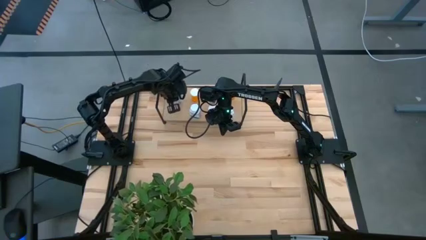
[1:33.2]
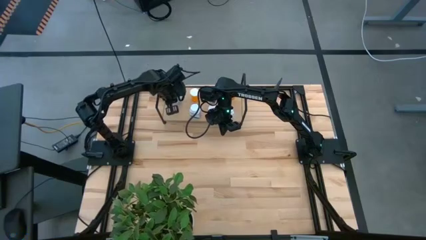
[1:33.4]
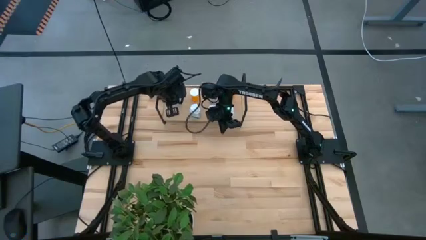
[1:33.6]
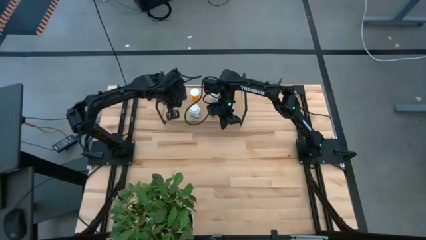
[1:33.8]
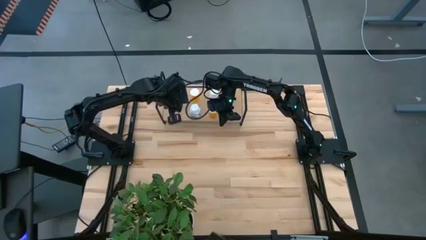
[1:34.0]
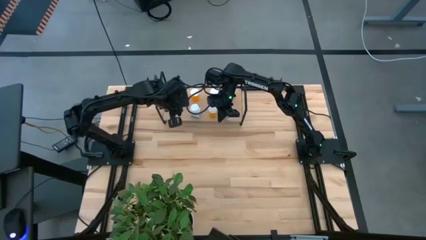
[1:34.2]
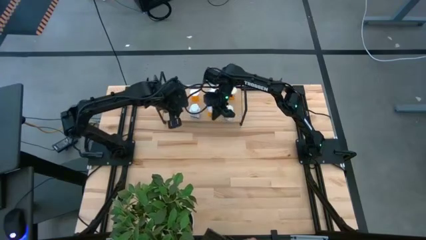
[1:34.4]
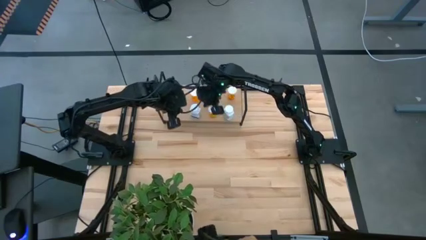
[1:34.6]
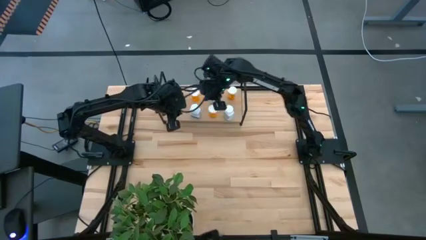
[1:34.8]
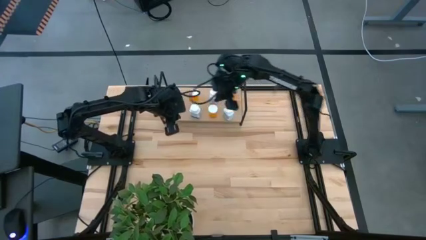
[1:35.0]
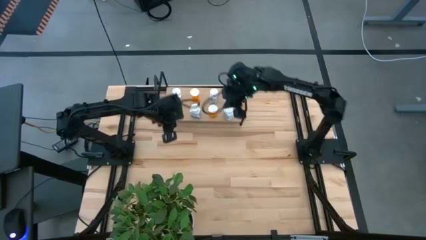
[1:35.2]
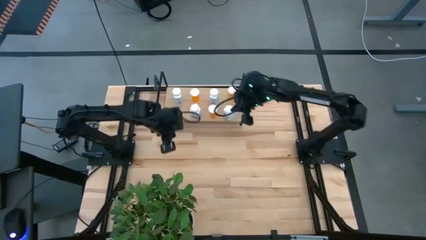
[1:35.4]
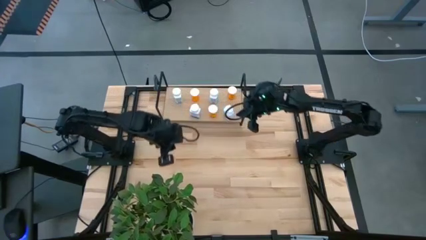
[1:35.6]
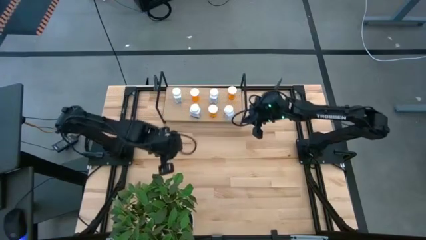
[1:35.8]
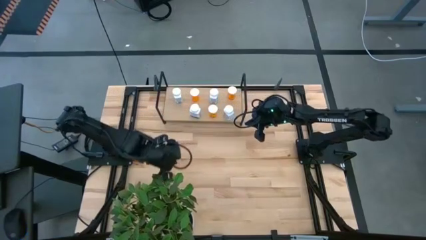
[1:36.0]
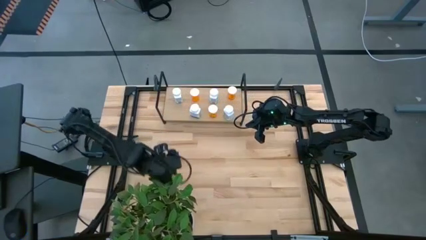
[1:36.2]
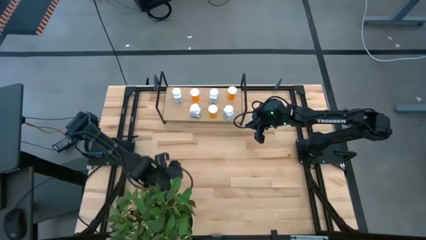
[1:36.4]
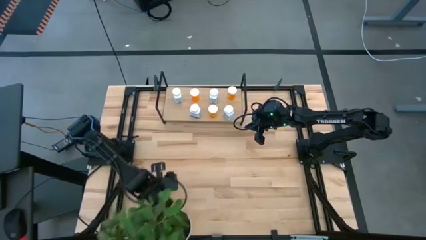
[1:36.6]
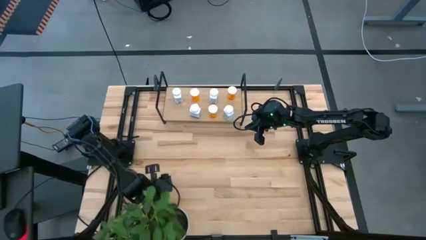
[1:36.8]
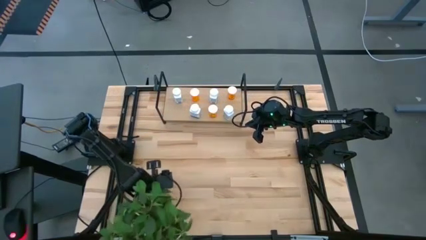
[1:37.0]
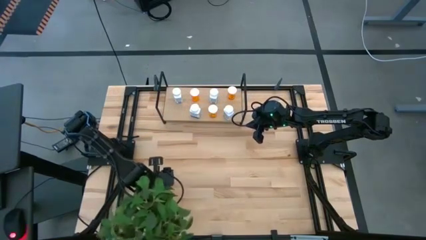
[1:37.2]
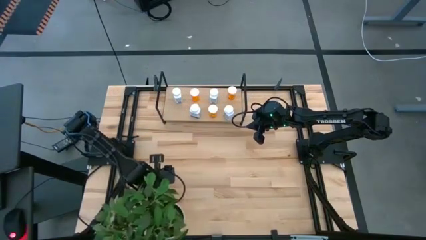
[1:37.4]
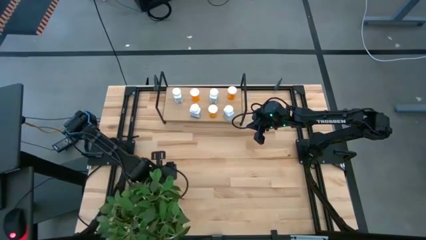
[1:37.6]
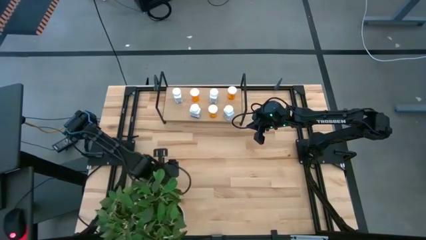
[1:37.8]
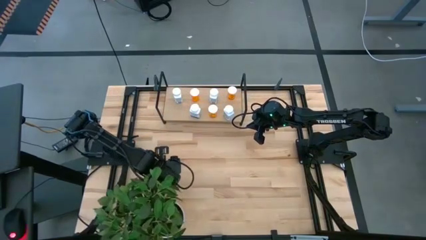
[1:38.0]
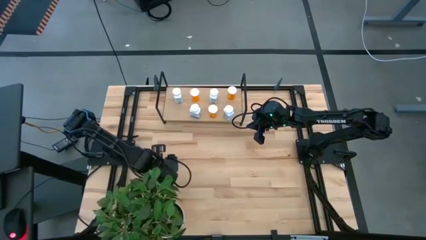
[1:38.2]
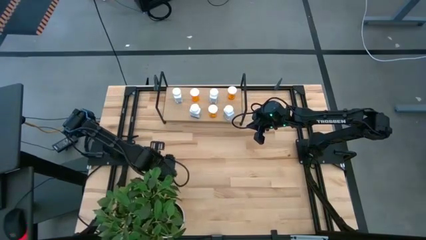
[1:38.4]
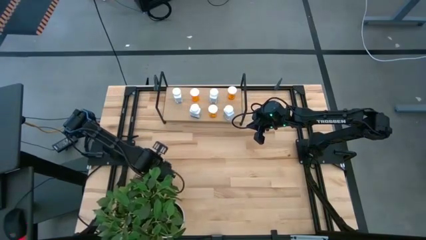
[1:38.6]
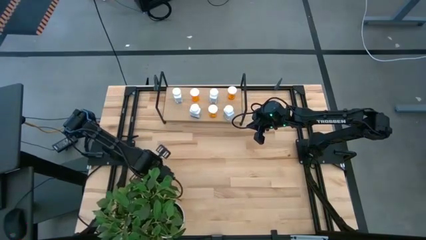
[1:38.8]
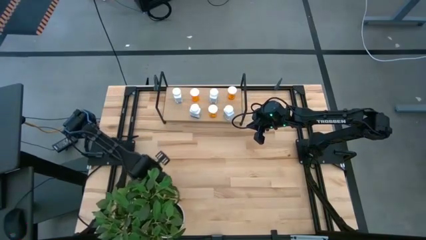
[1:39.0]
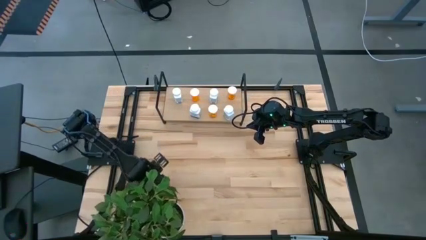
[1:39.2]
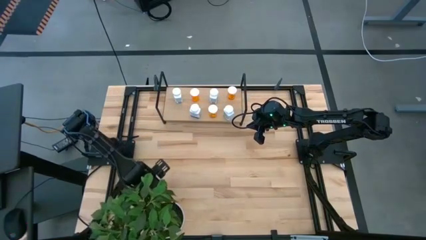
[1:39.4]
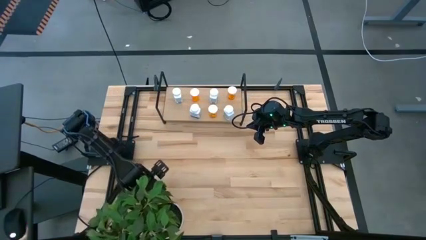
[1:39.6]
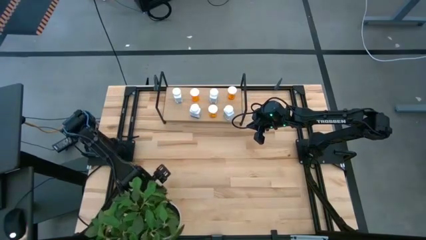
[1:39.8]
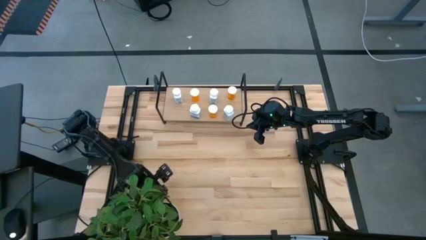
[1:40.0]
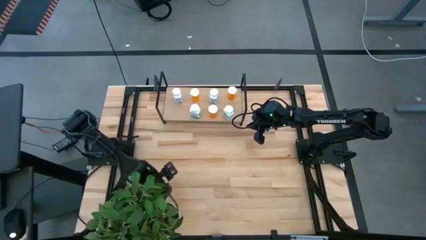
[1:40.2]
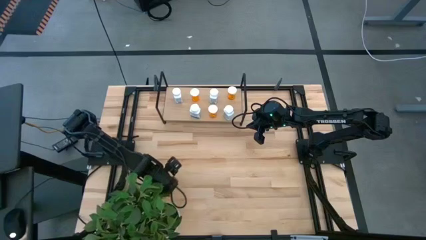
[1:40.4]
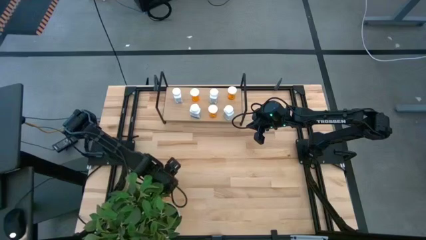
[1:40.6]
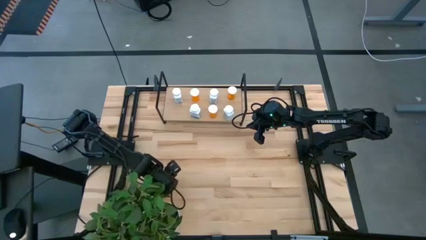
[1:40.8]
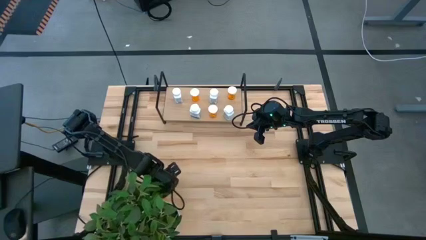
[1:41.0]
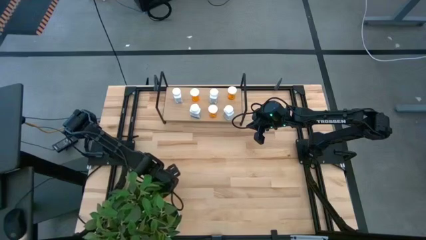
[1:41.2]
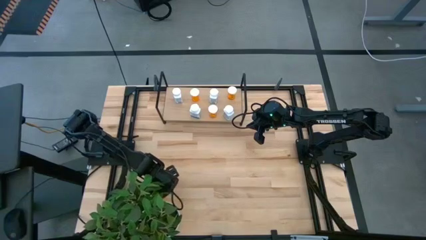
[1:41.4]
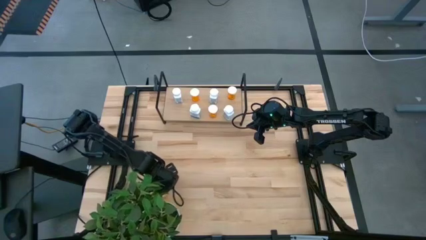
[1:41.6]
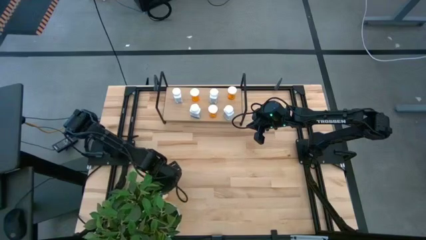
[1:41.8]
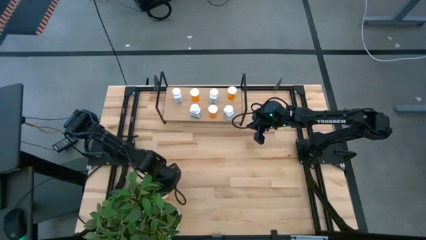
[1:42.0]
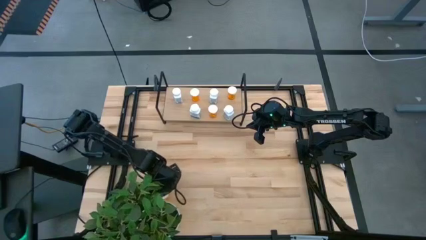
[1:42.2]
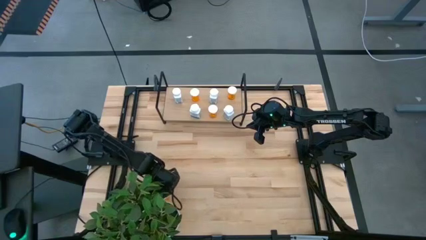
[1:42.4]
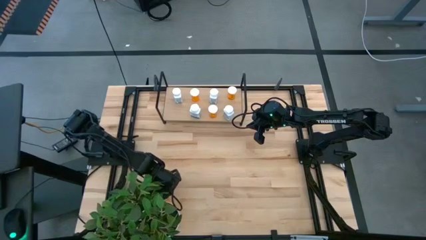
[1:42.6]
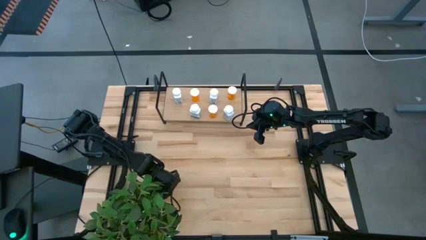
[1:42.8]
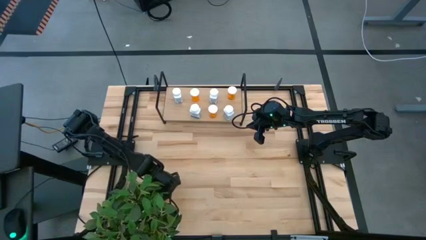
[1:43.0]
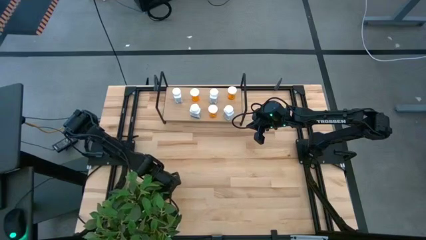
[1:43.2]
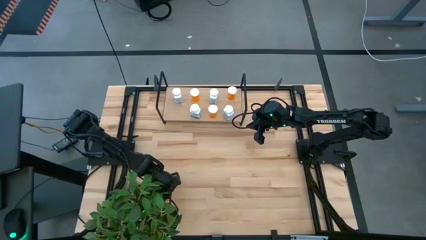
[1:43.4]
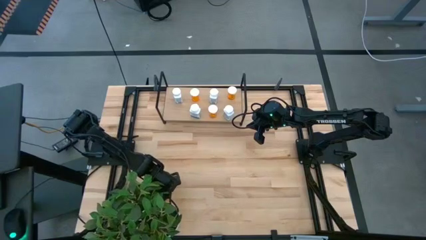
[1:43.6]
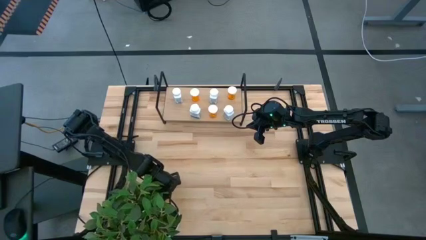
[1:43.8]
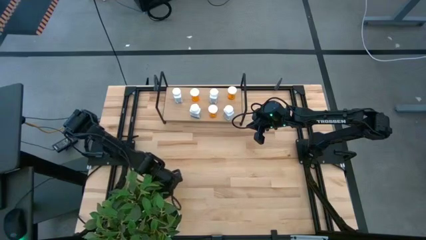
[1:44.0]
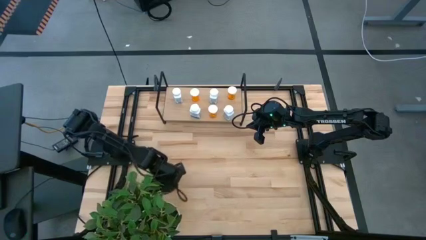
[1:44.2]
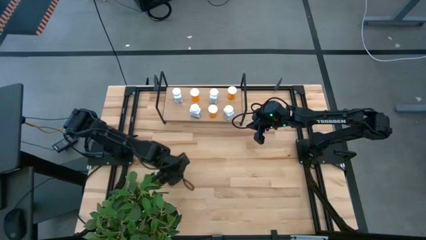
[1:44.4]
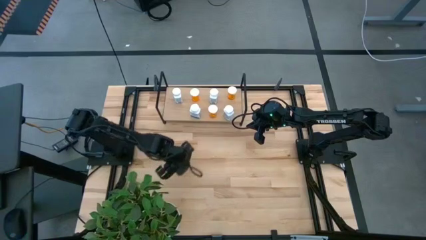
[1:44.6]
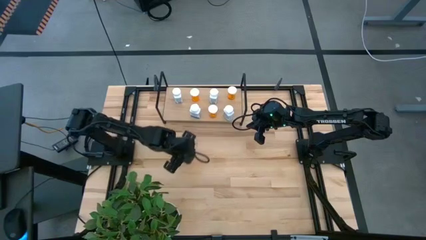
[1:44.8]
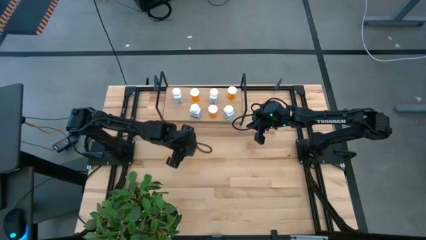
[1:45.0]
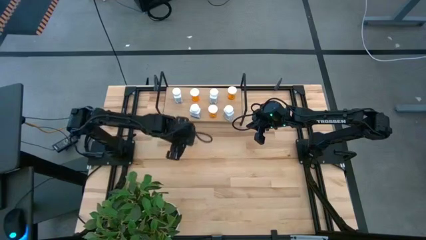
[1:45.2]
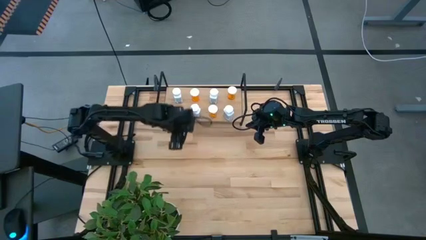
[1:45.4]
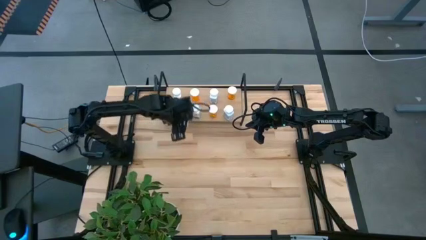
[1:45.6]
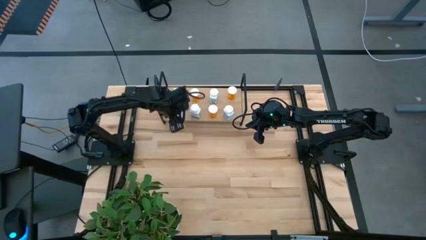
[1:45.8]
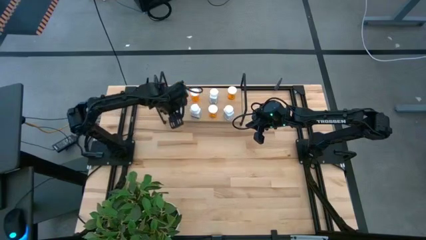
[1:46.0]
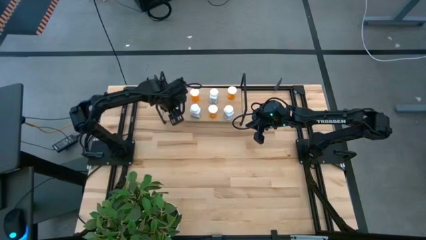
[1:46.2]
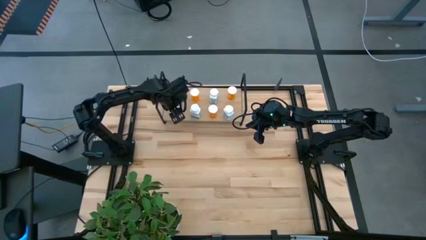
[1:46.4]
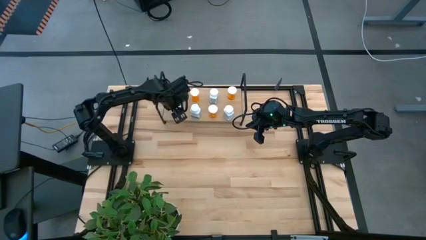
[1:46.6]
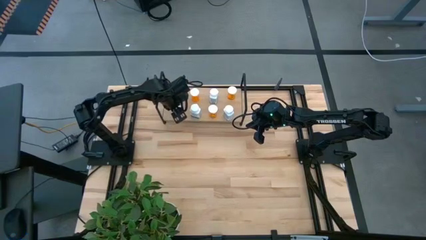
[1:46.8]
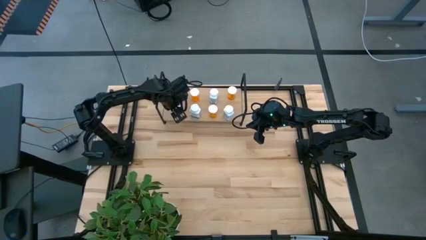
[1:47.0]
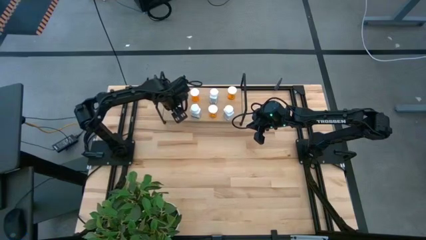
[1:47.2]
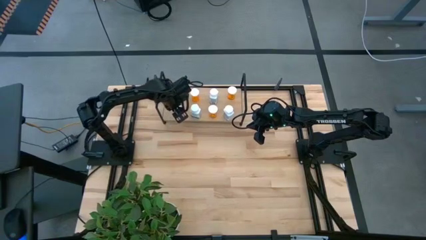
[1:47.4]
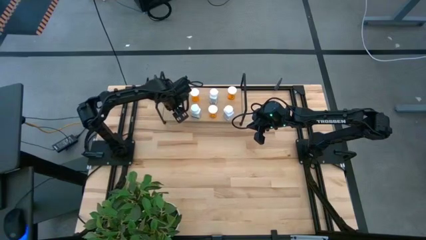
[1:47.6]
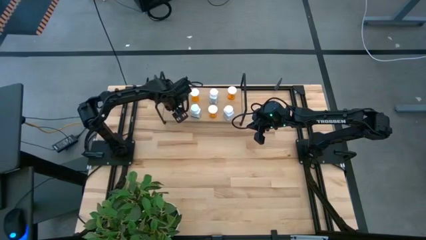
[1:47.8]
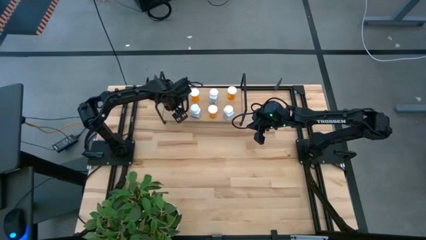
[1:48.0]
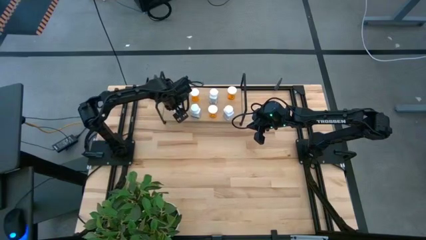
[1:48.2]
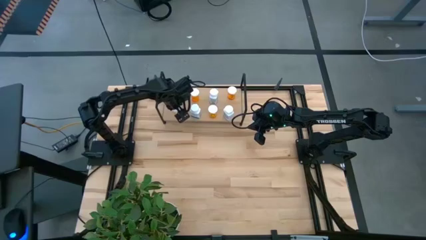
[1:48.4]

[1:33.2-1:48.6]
Task: Pick and place medicine bottles onto shelf by color
Put the orange pill bottle on the shelf
